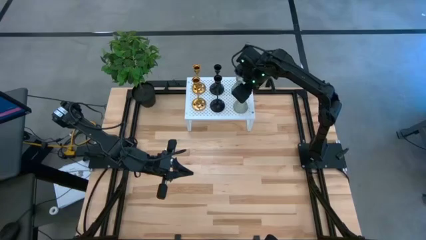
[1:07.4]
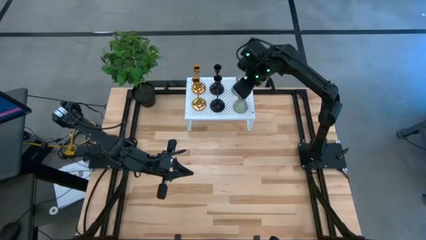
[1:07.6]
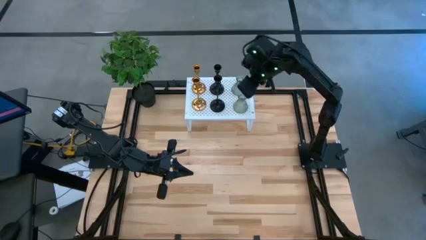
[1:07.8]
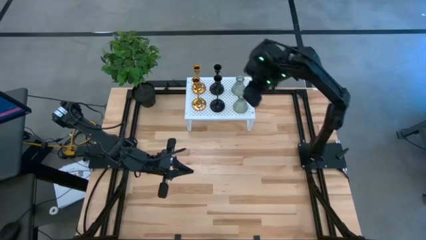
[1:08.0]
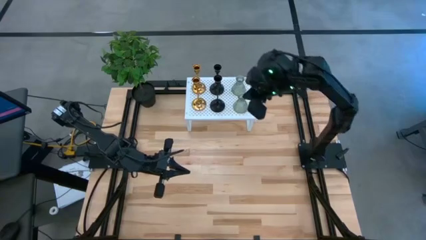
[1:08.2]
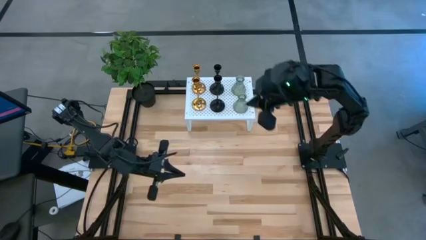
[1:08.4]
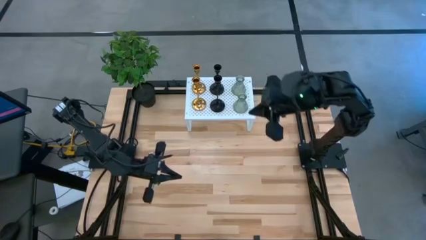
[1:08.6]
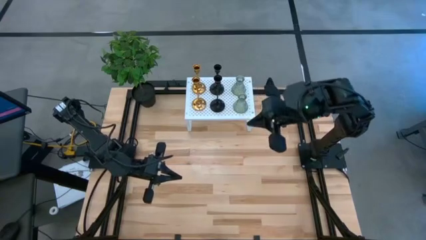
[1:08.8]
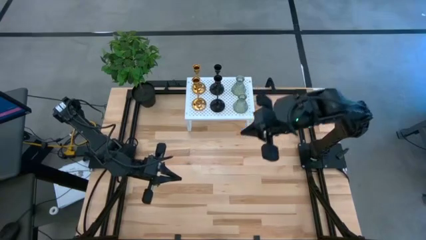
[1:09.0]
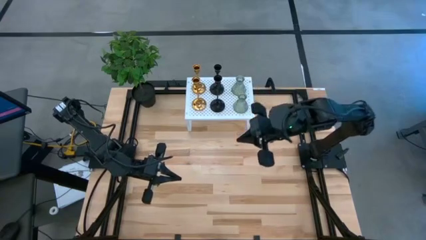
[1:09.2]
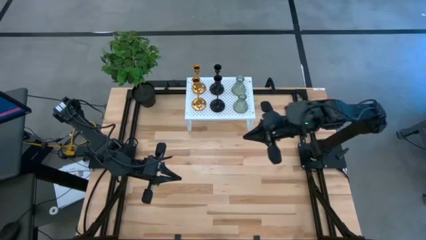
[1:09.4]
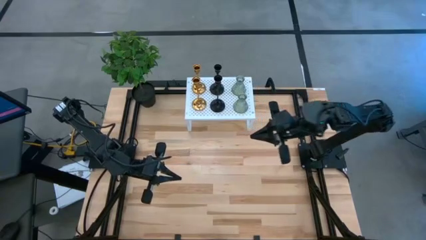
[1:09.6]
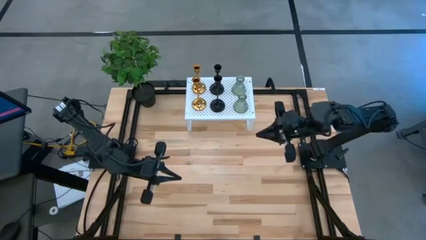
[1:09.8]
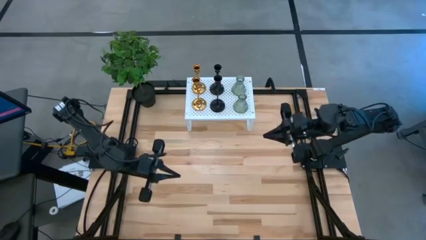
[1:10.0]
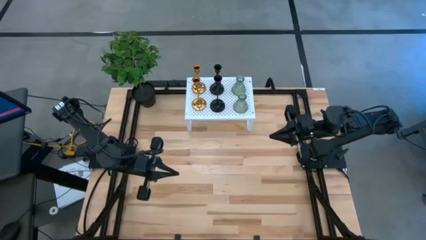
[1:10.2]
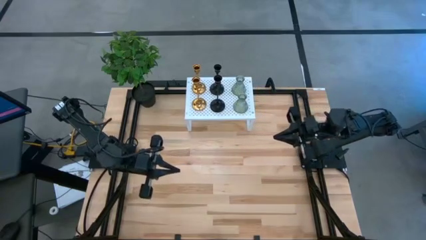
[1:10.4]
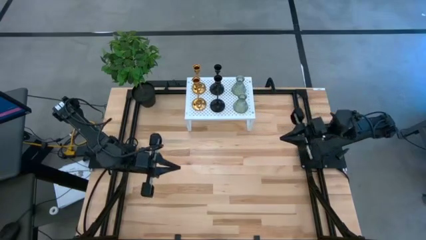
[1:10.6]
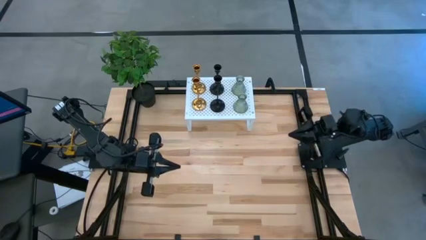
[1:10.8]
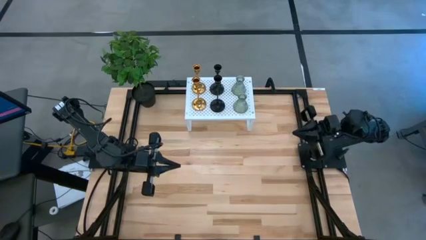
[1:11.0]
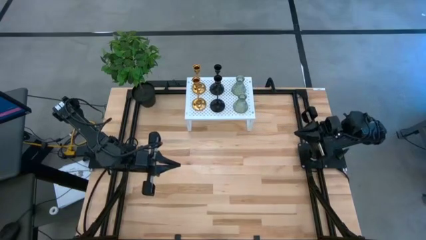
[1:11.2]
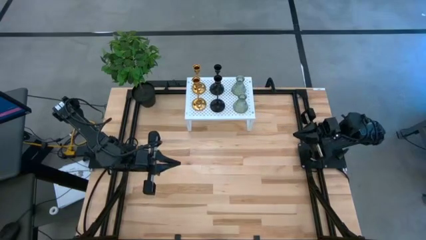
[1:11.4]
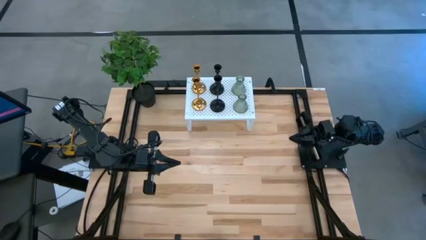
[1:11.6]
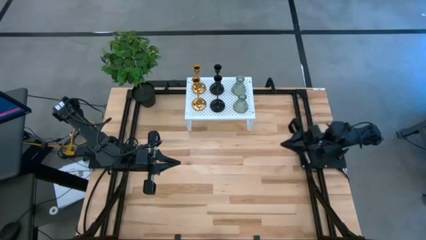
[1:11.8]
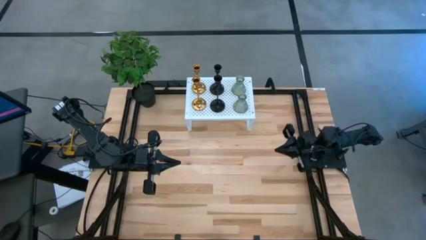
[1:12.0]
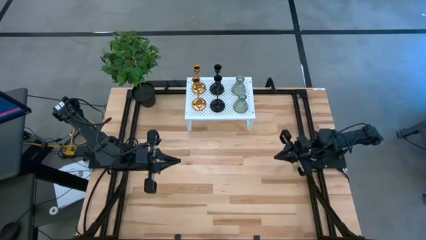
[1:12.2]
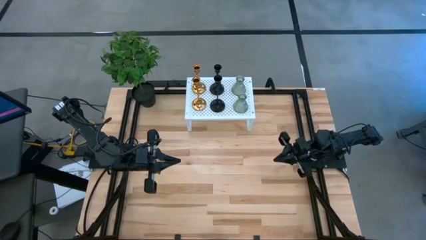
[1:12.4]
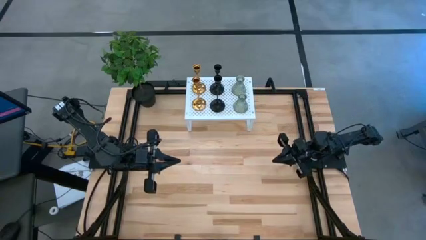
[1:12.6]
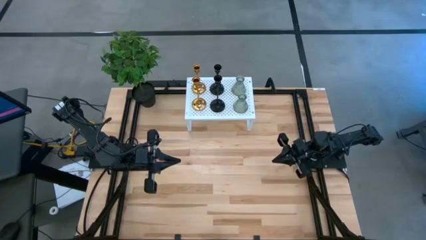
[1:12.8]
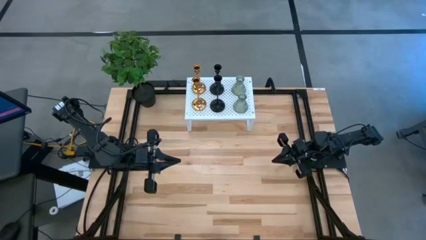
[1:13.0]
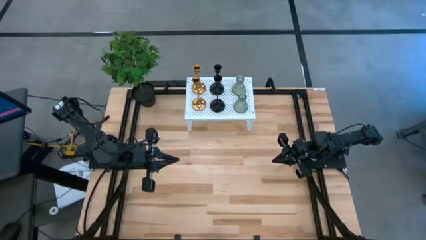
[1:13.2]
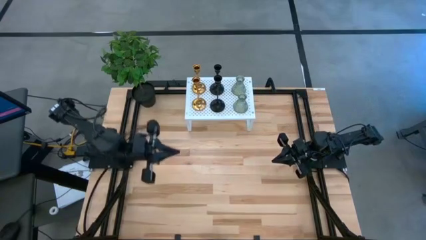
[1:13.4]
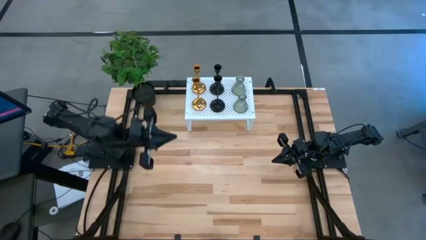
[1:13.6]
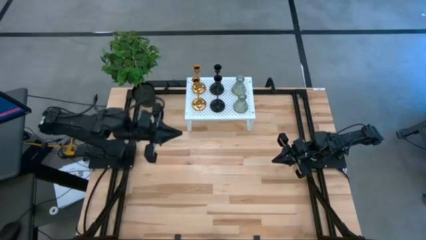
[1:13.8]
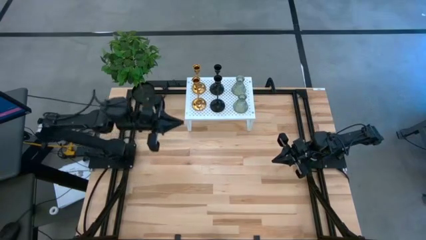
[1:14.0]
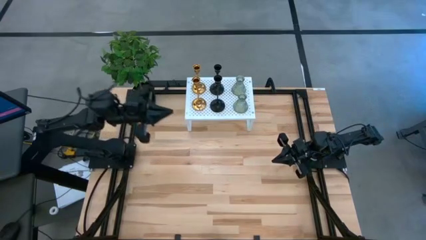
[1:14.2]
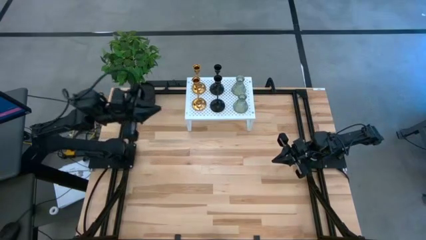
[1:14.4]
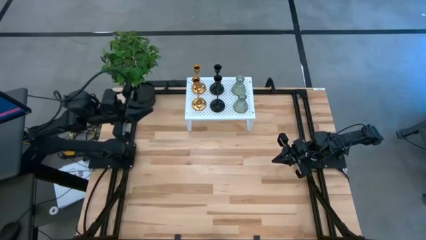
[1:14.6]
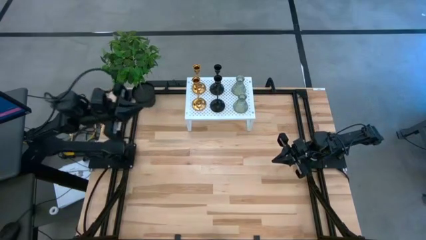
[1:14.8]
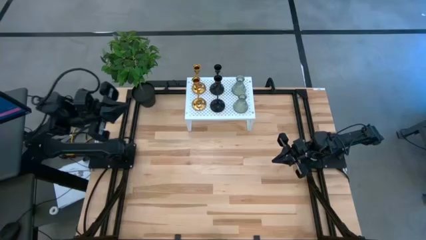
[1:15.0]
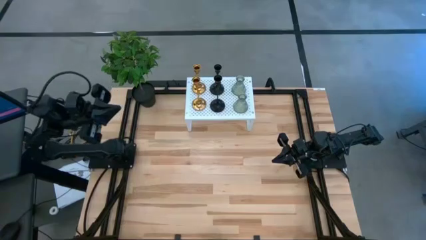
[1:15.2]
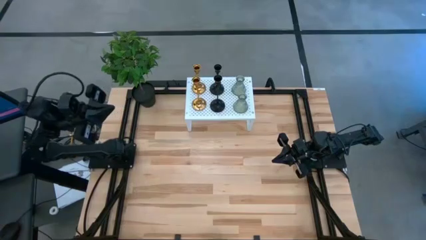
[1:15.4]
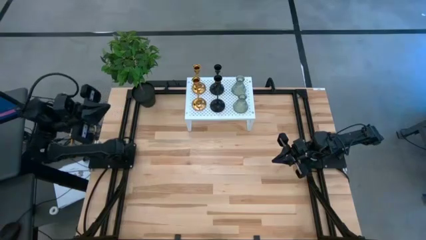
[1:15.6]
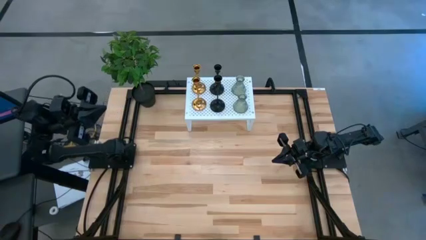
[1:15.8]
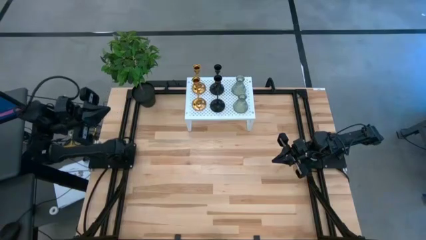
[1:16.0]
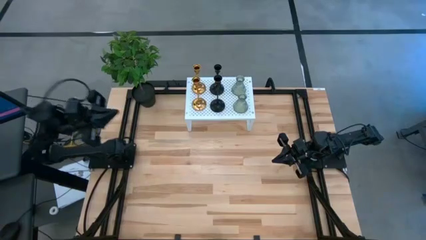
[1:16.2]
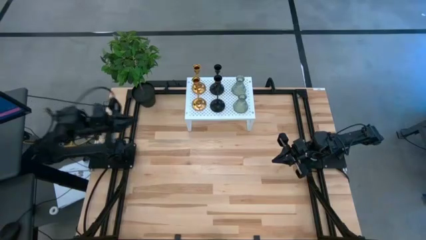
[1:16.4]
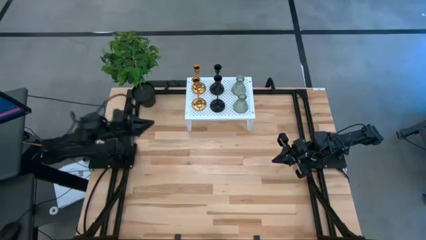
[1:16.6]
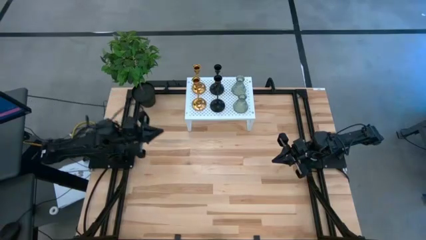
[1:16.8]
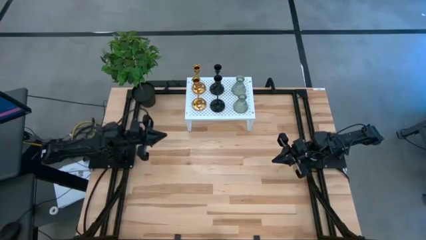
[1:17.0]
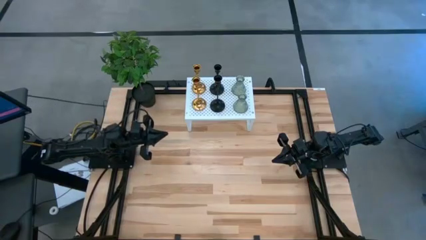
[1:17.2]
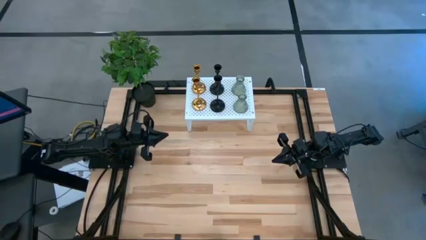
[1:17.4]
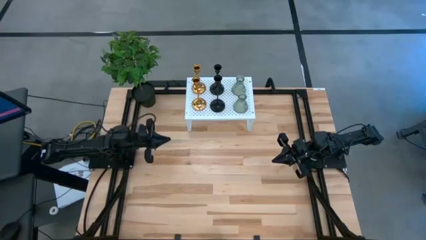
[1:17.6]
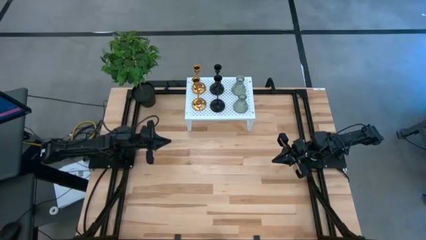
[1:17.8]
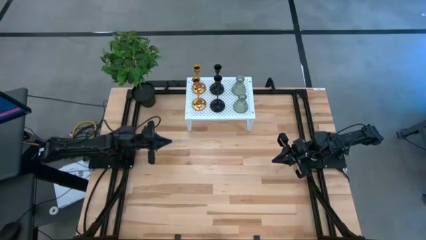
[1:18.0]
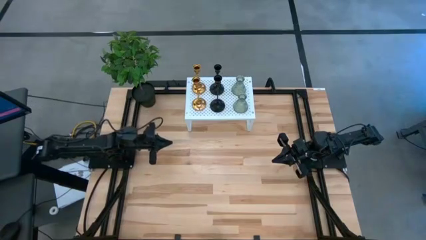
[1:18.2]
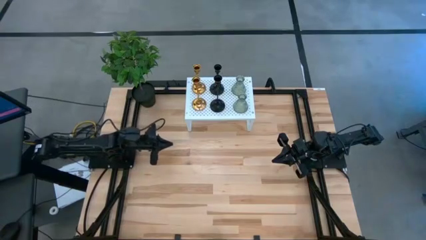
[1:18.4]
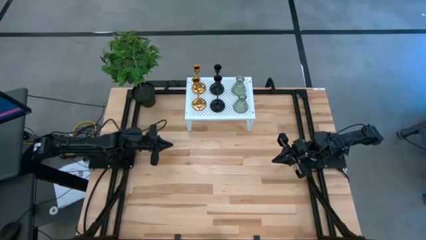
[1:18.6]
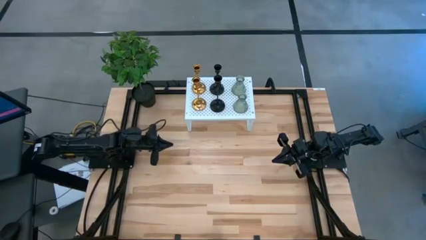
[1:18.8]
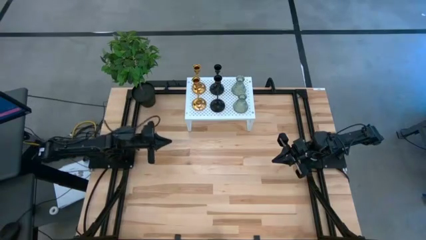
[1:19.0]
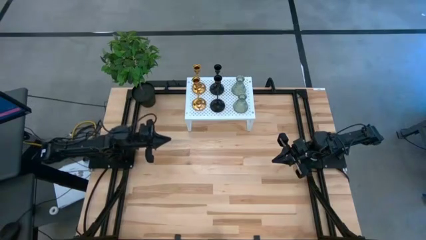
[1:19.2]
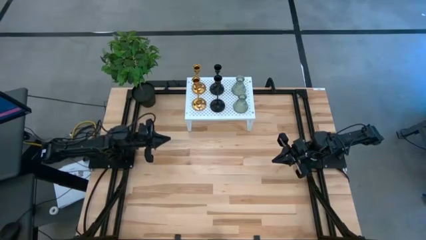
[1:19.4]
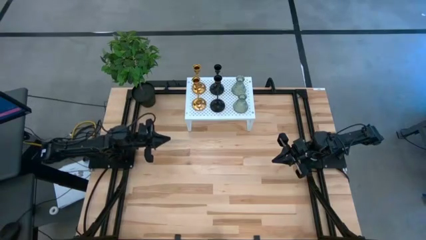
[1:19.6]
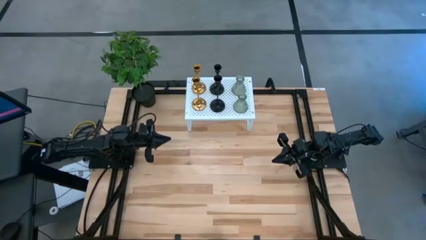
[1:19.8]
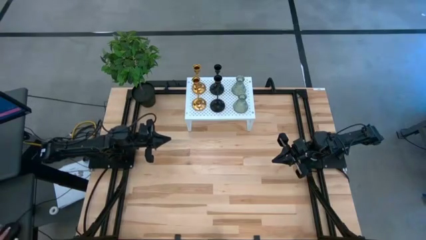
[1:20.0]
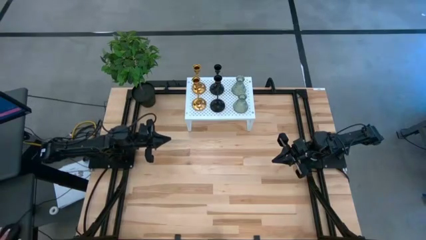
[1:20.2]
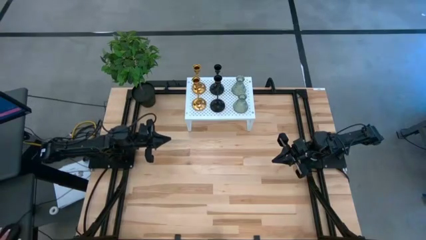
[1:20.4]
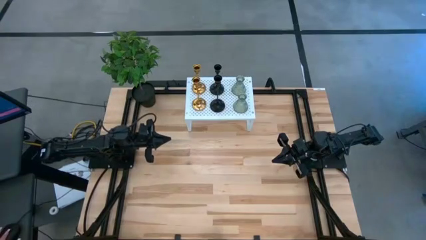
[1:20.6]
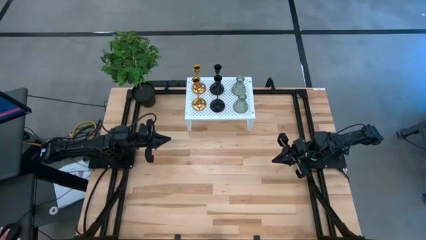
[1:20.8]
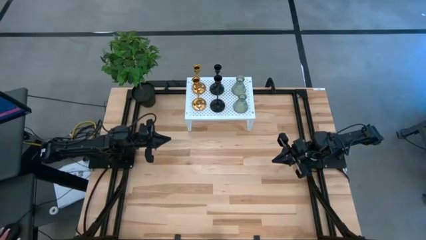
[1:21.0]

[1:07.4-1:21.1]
Task: Pick & Place candle stick holders
Return to Home Position

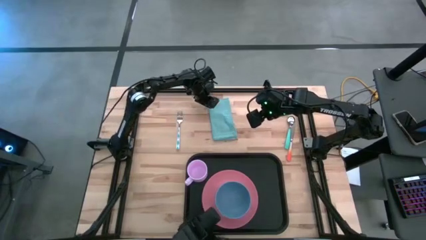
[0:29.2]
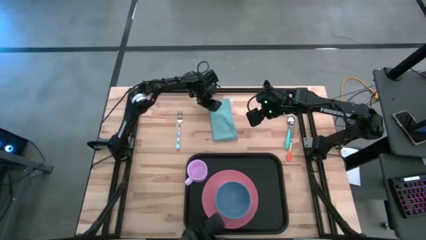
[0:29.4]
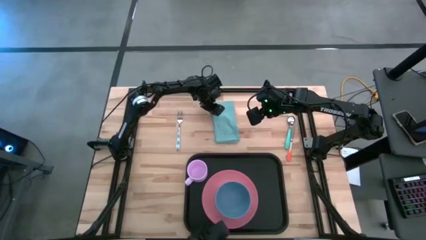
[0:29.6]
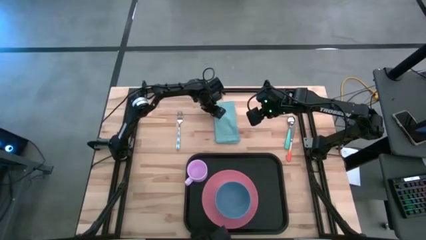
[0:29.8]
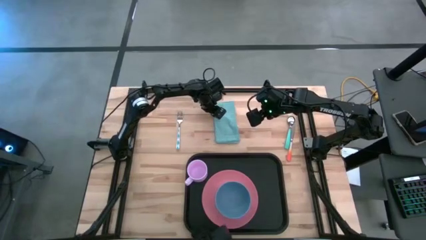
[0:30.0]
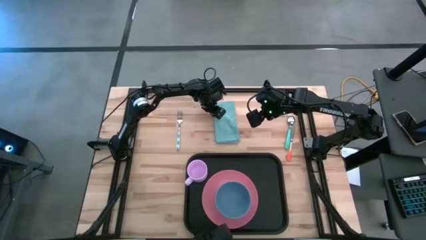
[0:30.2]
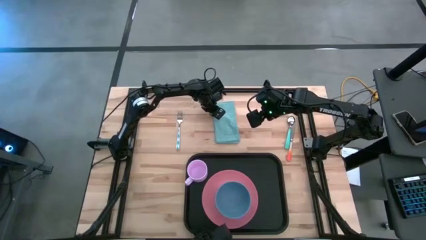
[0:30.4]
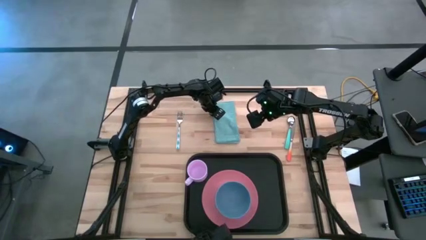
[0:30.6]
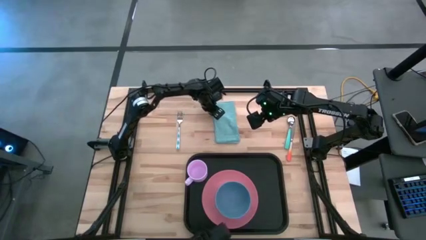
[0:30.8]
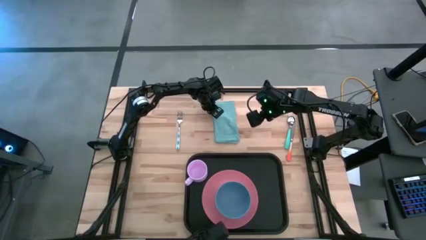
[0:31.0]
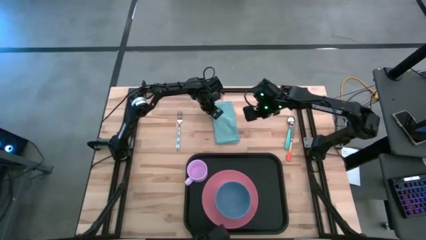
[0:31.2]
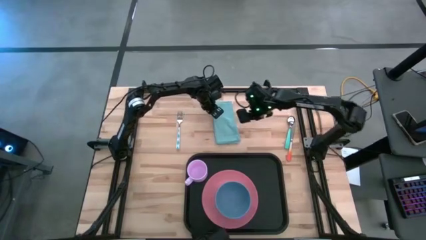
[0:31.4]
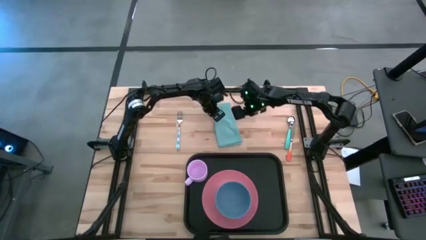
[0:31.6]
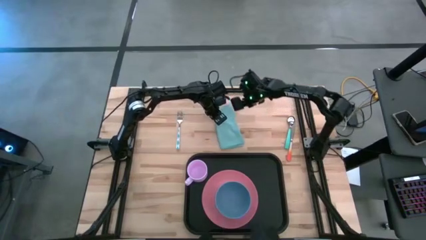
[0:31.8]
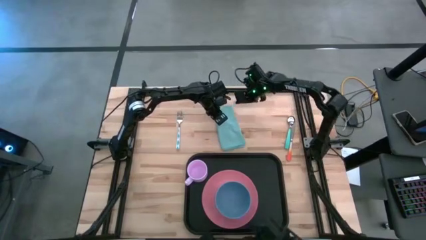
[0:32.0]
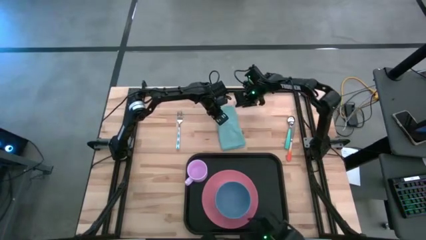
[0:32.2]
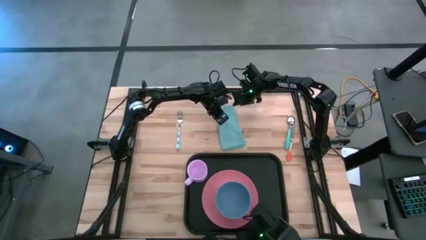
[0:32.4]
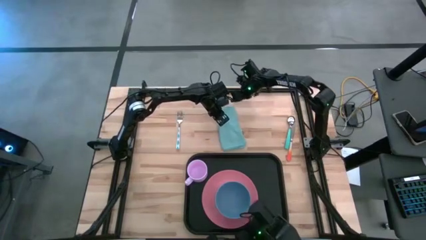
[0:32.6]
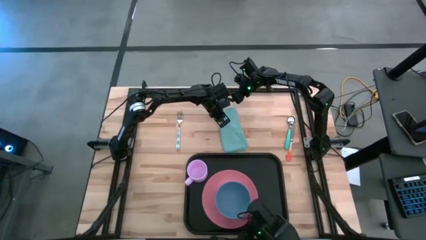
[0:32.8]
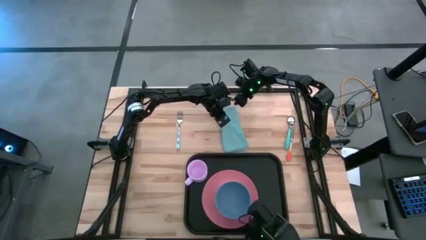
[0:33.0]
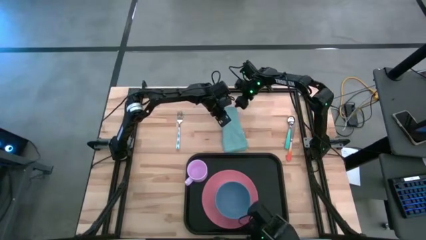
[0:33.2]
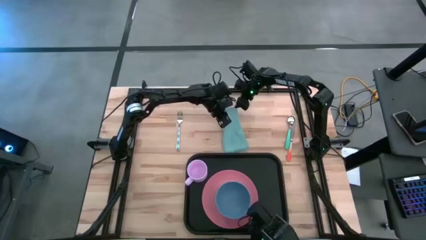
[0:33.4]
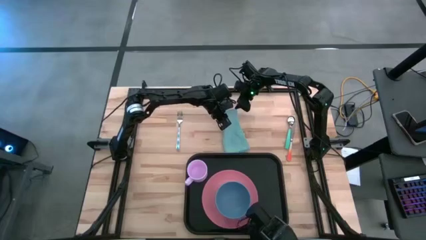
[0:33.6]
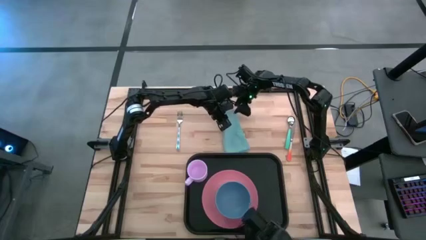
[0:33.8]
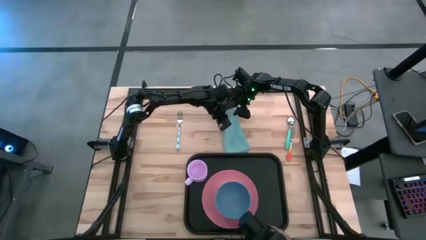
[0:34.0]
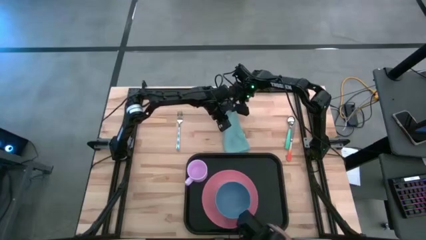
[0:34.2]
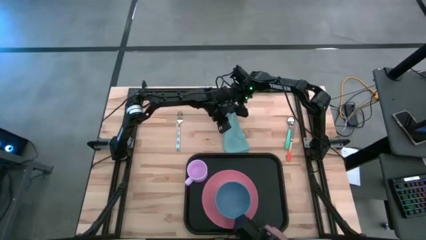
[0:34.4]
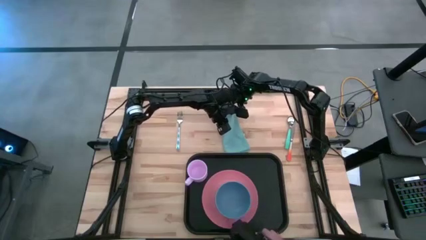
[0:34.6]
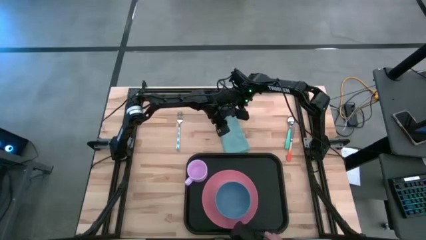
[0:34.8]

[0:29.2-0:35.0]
Task: Set up tray
Put the blue napkin on the black serving tray to the right of the pink plate
